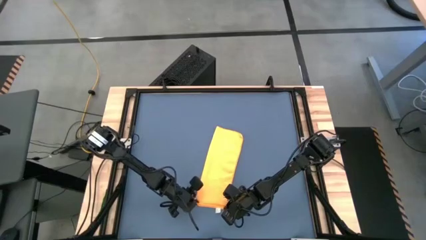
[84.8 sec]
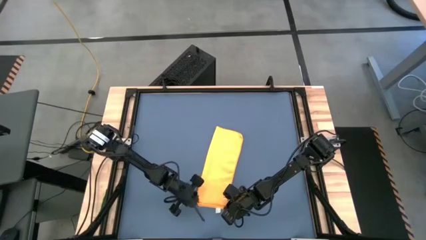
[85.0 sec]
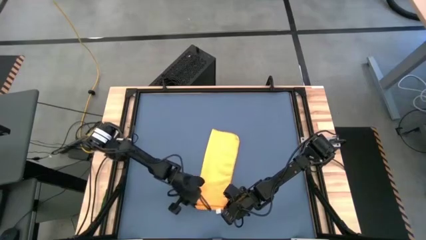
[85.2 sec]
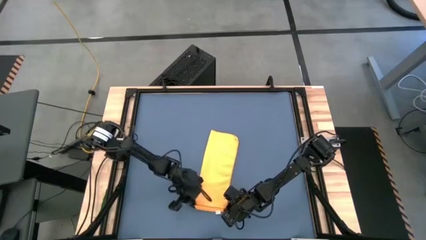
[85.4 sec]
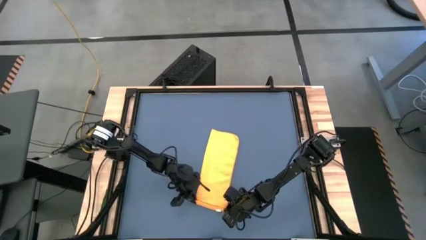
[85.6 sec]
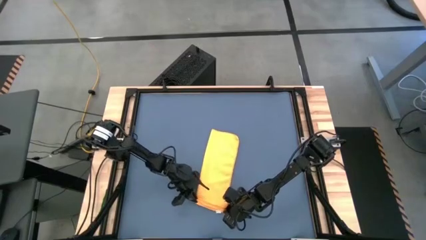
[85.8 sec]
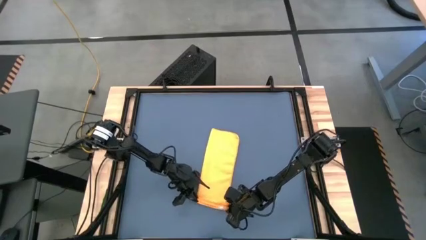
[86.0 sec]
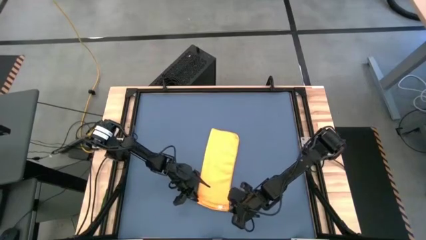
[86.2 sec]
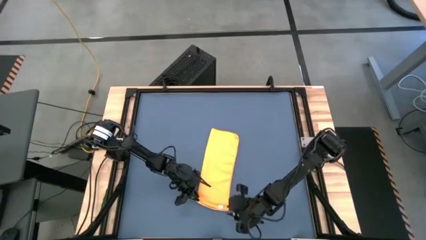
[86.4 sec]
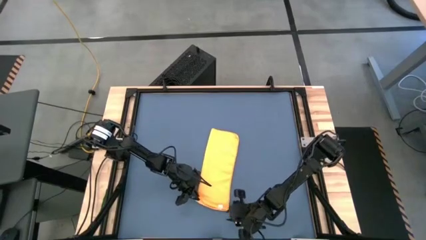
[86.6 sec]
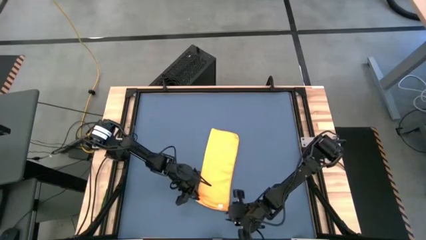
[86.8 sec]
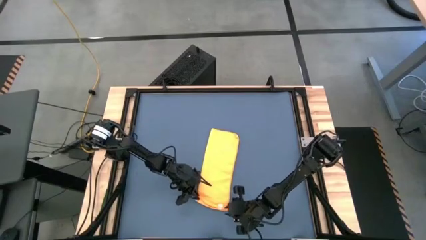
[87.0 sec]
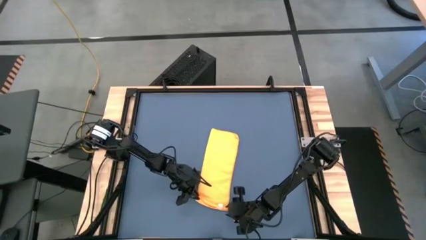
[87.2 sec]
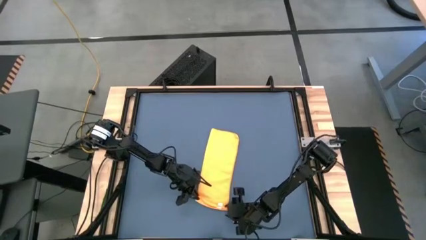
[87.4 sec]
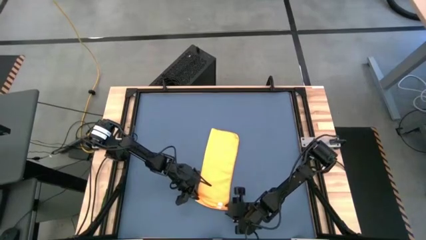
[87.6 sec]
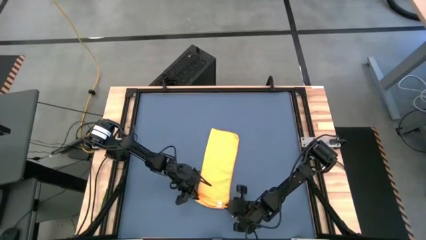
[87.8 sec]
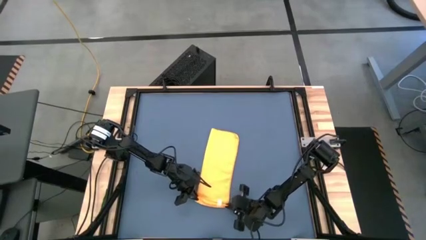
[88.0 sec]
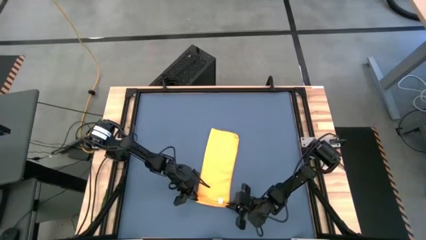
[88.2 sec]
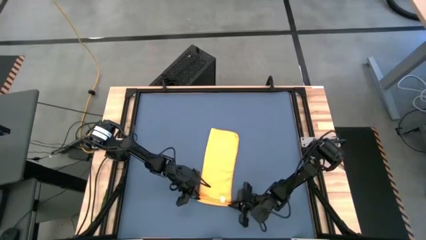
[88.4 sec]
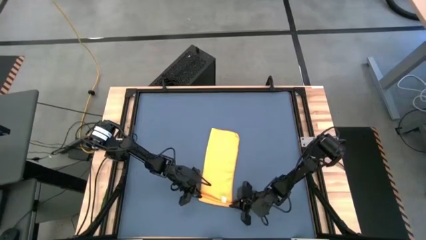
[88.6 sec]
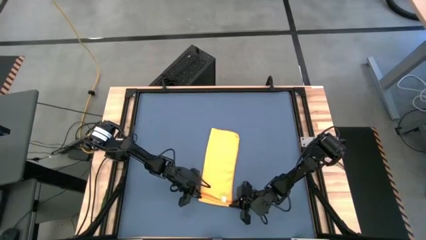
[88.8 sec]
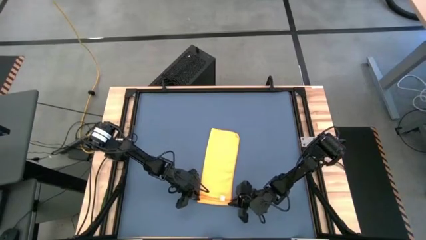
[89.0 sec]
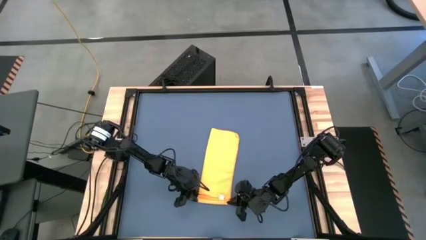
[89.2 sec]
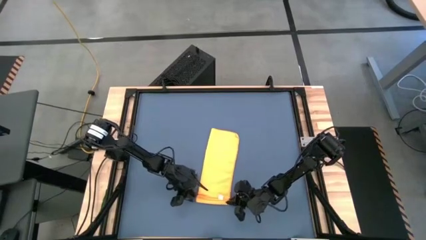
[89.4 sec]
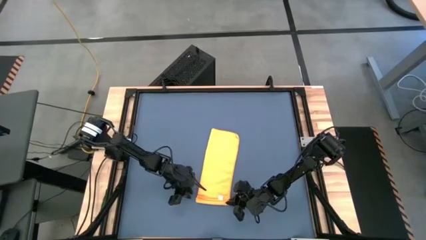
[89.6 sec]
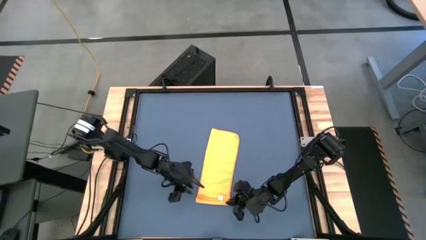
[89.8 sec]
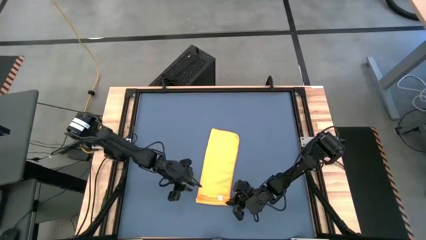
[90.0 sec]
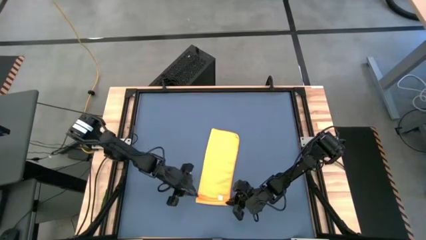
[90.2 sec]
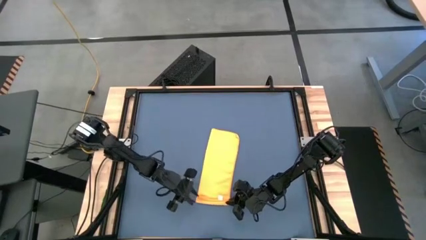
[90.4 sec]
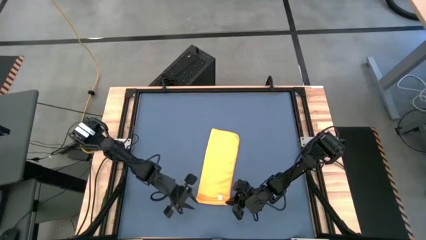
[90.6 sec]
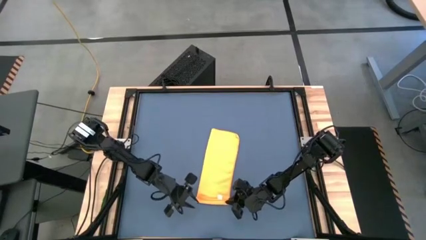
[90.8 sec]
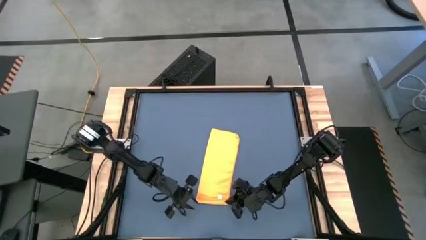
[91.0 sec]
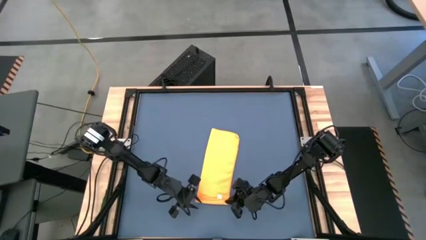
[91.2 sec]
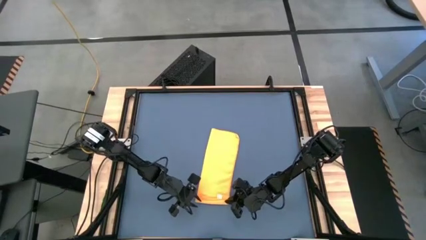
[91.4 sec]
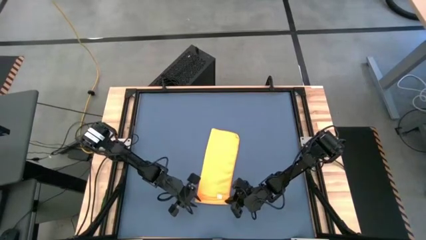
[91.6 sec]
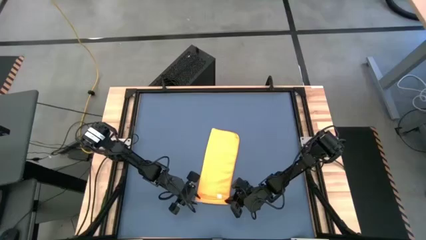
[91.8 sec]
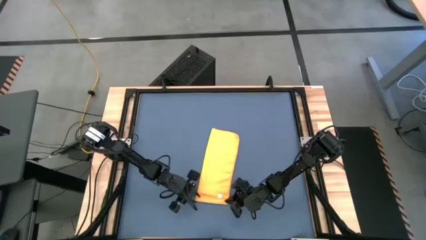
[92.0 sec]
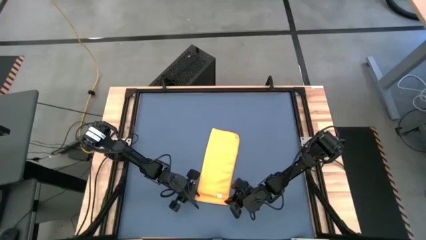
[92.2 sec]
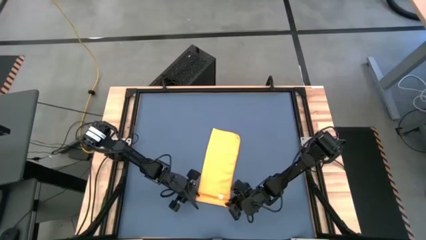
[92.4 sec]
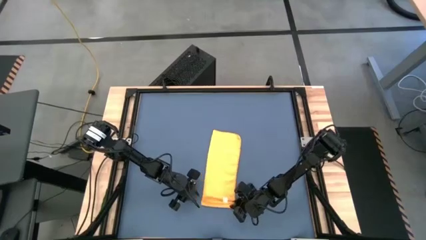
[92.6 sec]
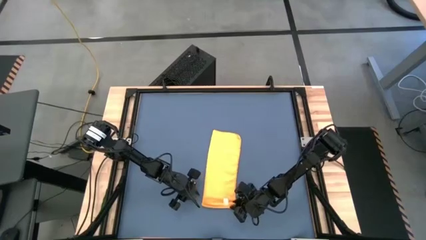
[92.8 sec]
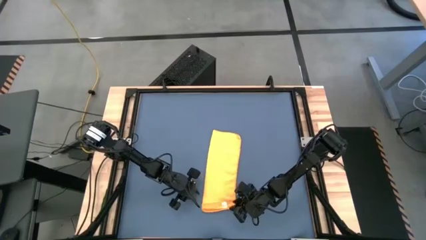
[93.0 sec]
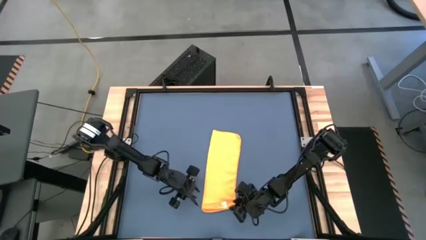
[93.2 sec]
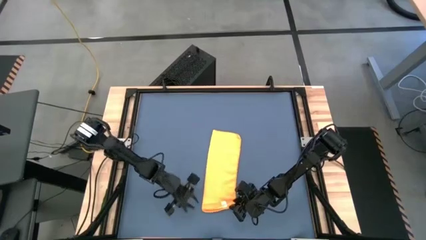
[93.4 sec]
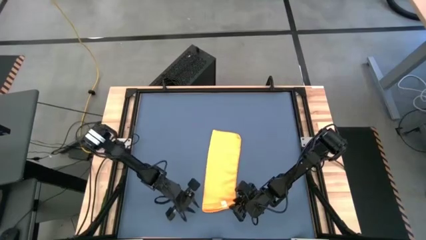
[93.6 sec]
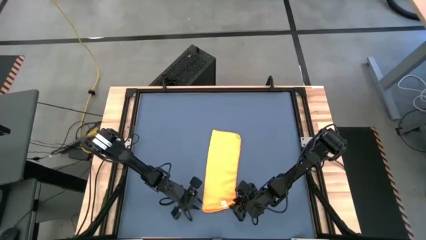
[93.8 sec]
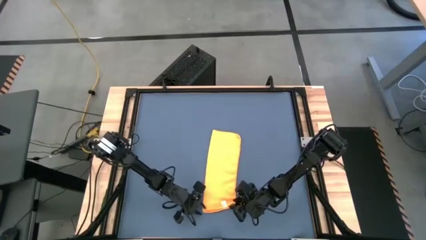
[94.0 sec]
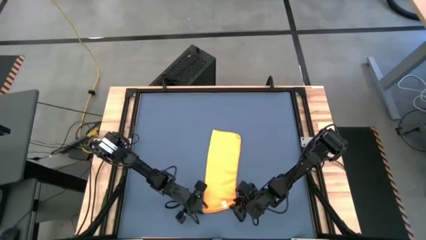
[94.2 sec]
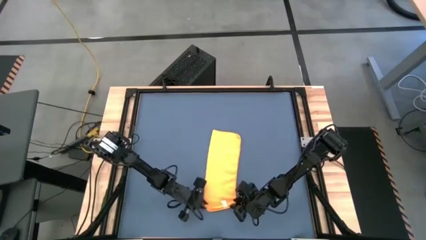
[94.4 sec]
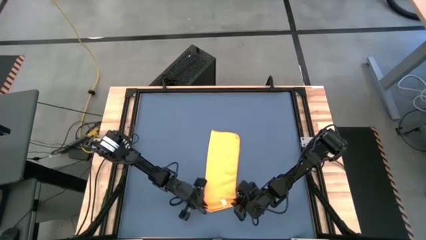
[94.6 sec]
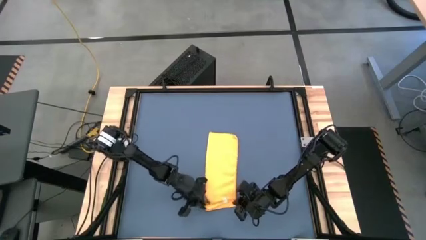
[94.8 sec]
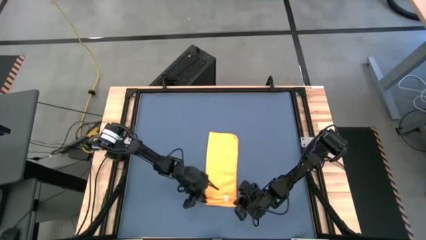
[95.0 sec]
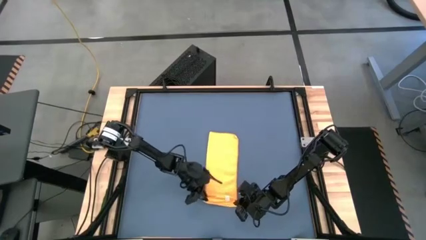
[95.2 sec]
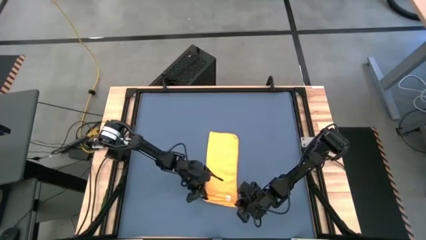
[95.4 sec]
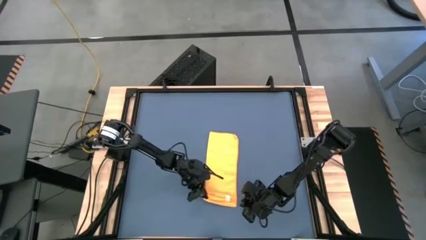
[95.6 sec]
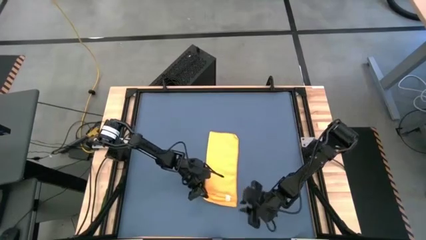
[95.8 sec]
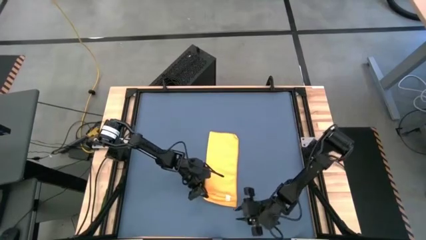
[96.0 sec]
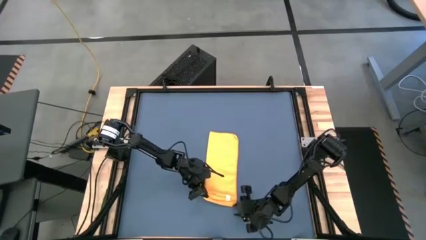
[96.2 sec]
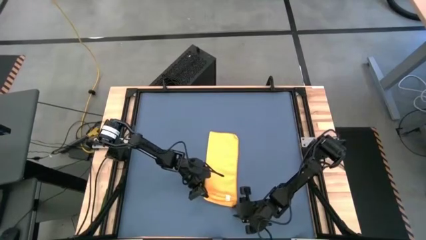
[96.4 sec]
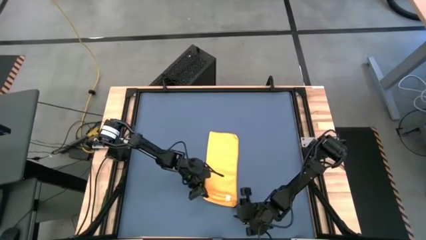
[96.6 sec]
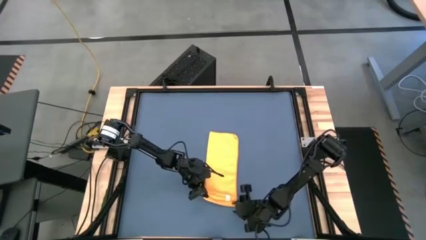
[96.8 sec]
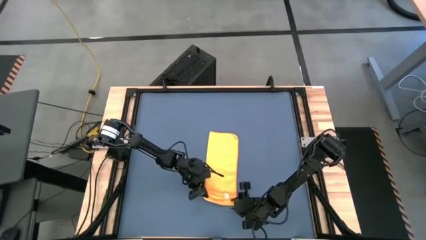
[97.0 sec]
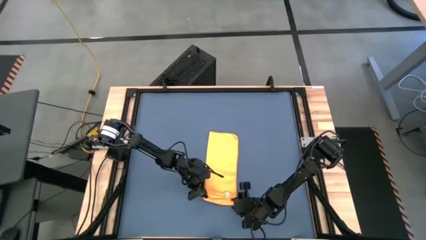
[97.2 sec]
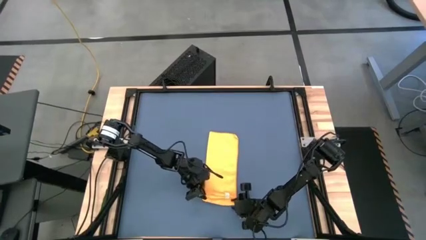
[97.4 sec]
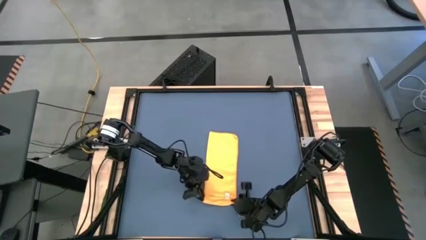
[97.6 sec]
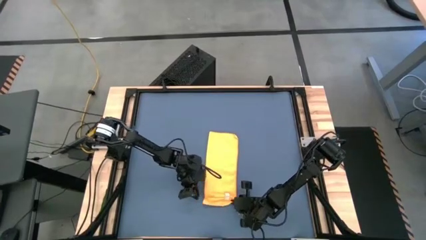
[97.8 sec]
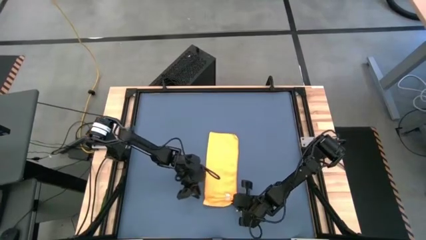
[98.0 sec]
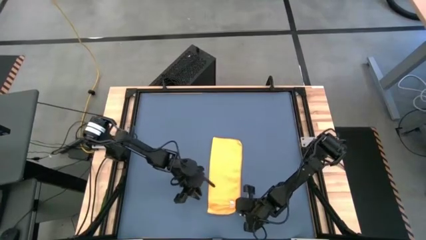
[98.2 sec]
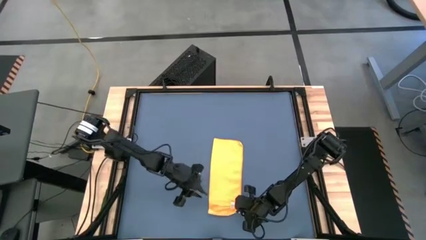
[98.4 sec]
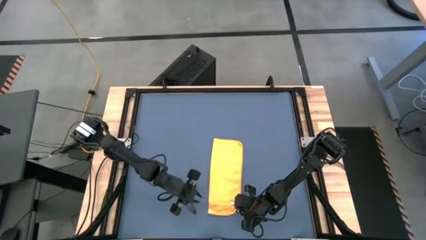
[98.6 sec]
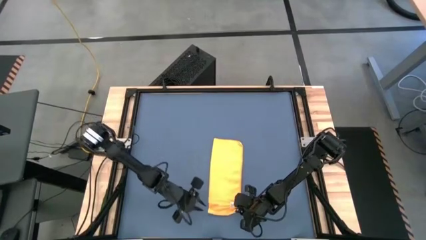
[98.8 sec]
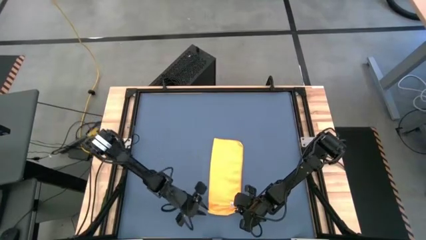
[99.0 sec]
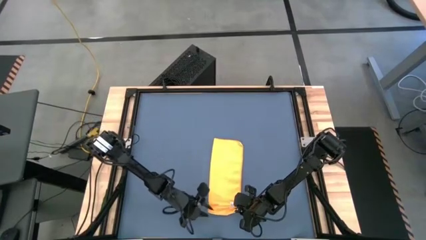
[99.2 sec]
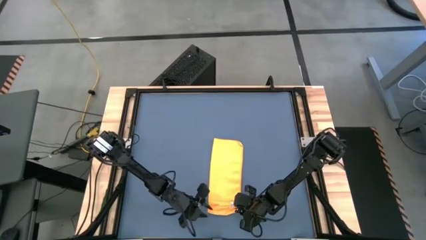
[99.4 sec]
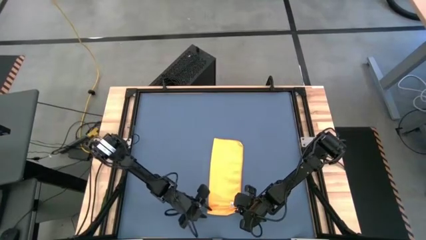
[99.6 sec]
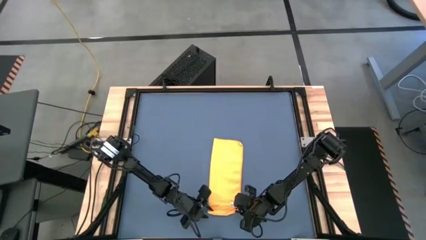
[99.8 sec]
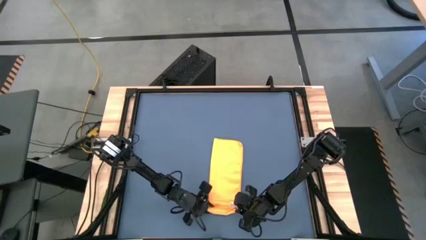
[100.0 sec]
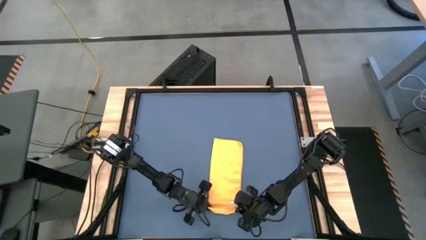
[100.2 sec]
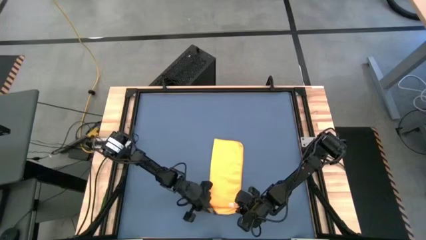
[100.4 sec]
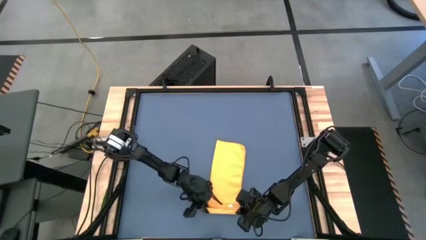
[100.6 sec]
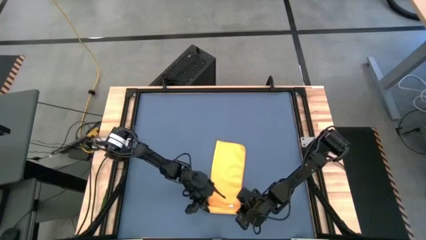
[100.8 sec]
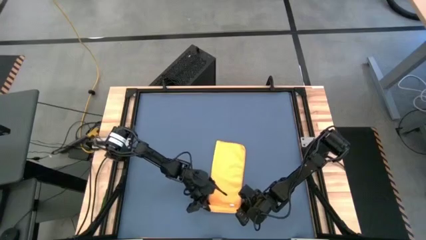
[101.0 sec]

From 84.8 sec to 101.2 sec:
Task: Roll towel
Roll the orange microfiber towel

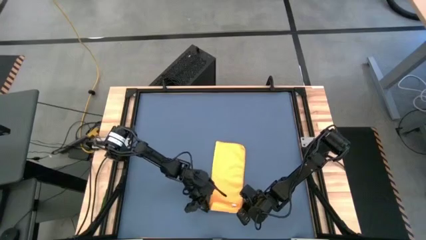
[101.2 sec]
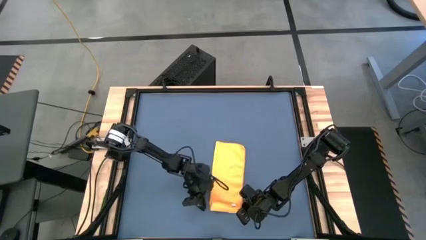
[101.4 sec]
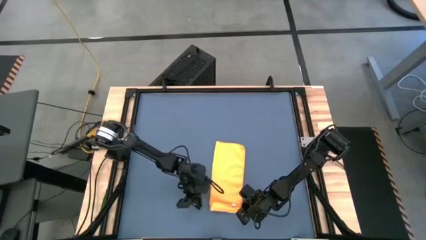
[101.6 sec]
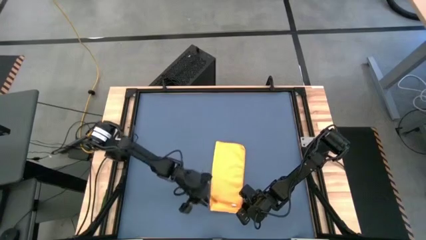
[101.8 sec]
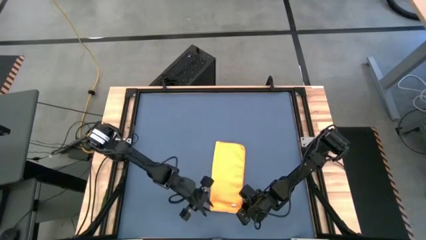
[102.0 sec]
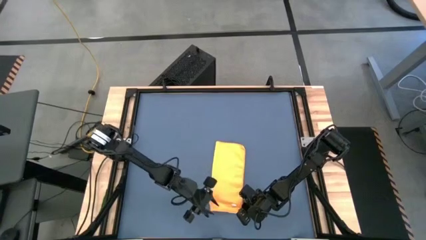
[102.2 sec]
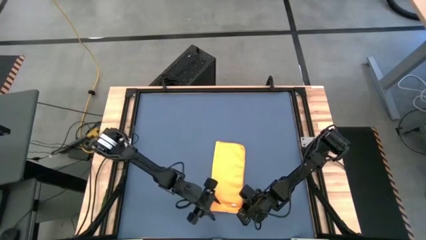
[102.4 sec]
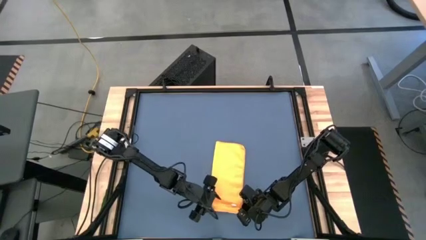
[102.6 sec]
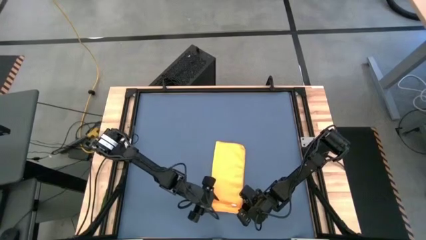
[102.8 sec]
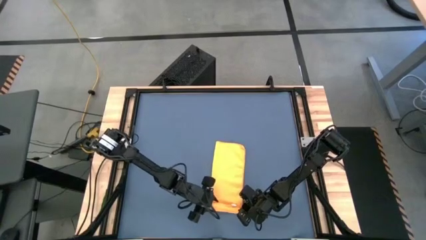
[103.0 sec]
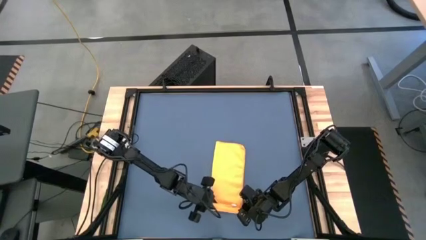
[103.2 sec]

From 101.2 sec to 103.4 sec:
Roll the orange microfiber towel
